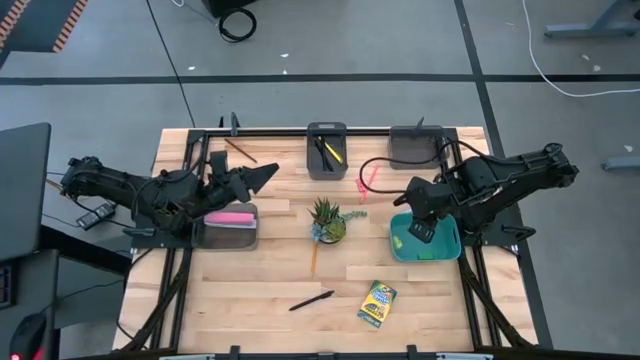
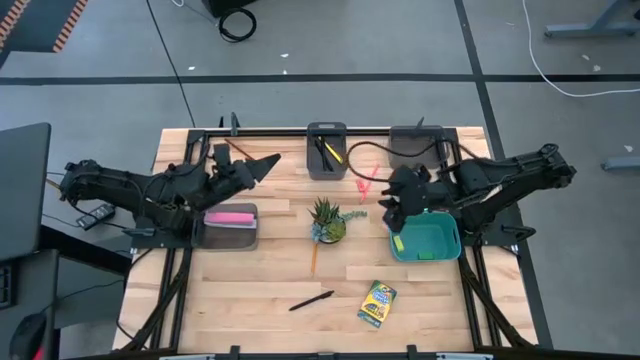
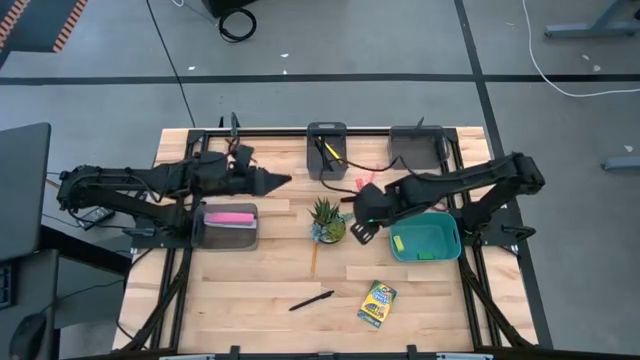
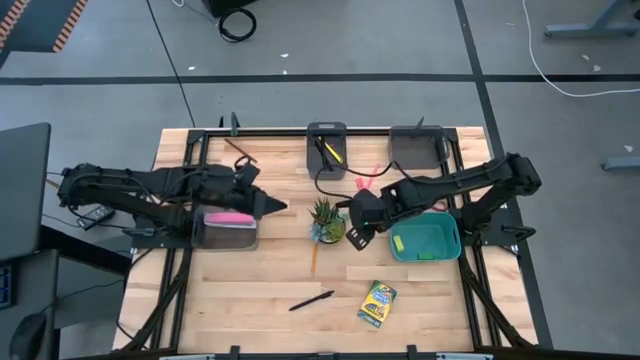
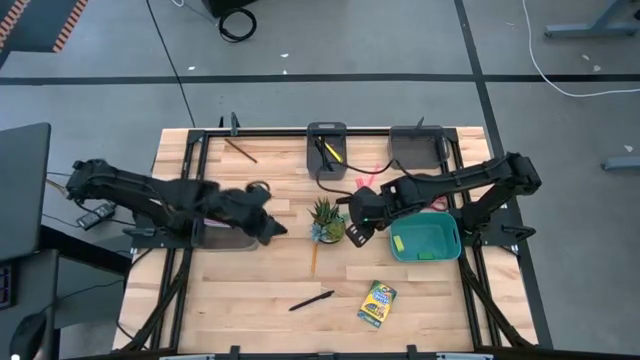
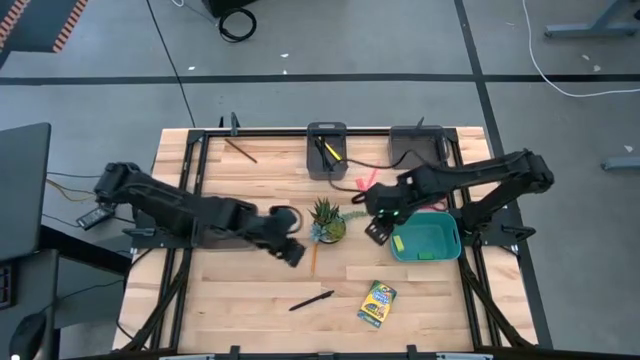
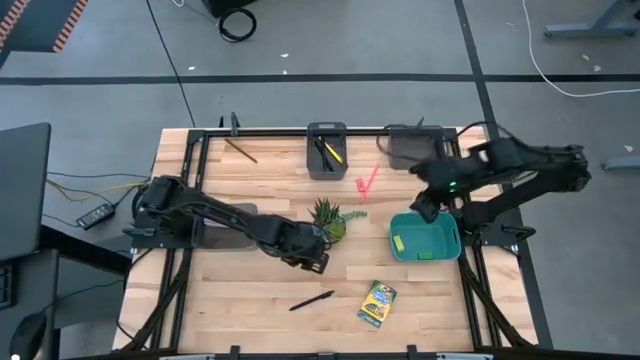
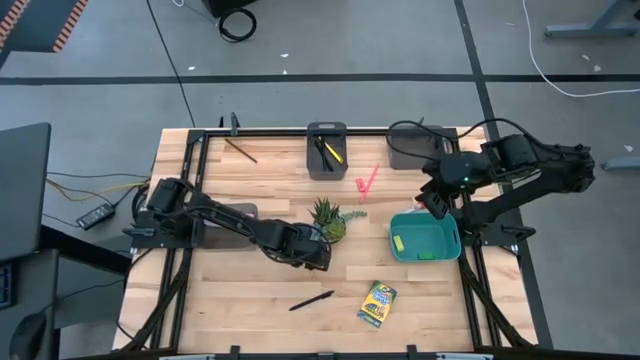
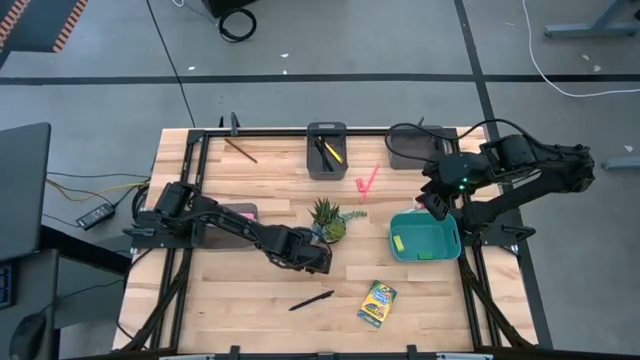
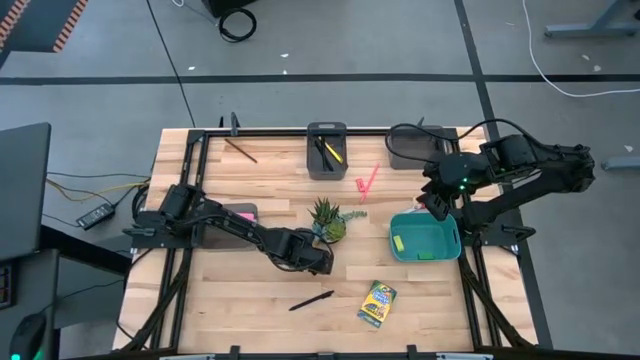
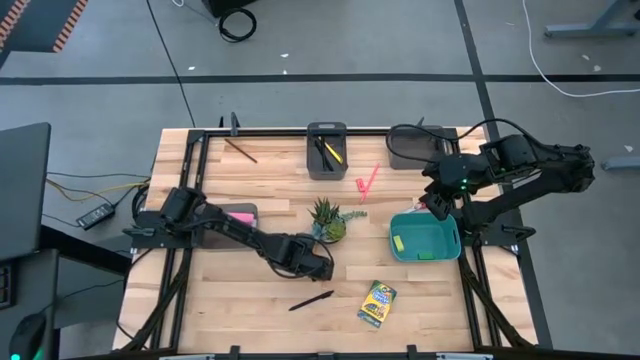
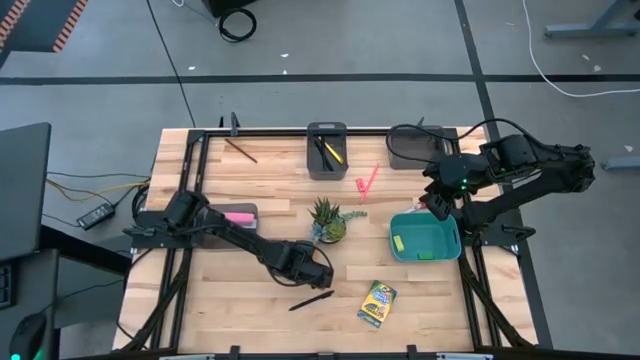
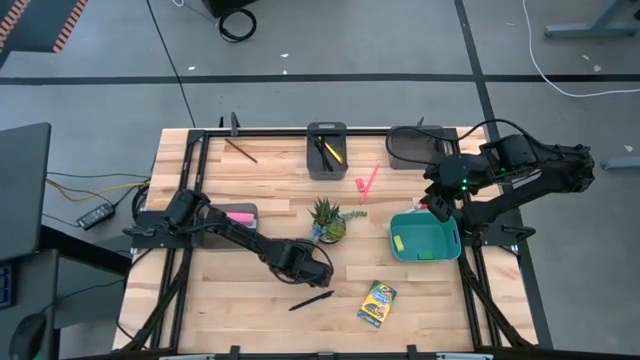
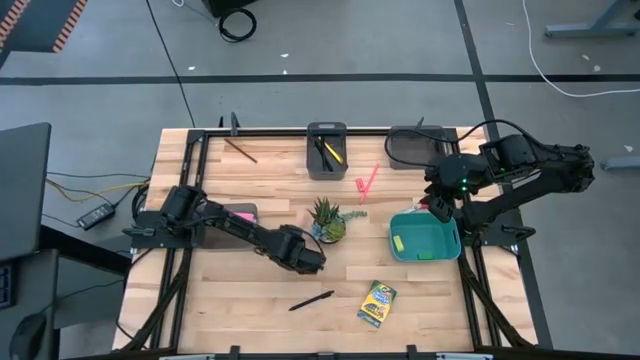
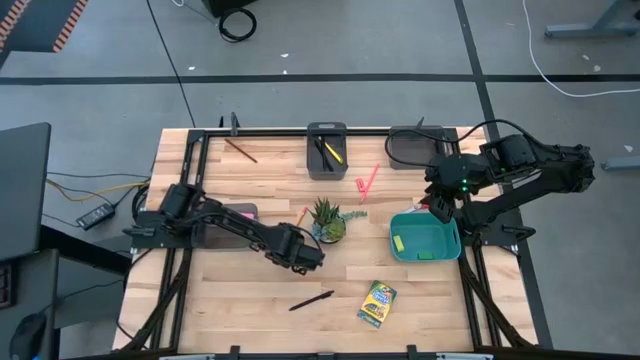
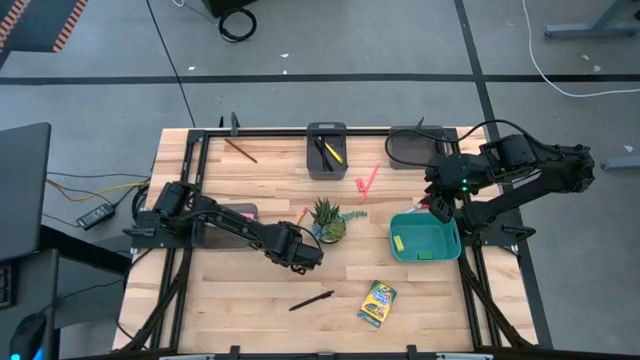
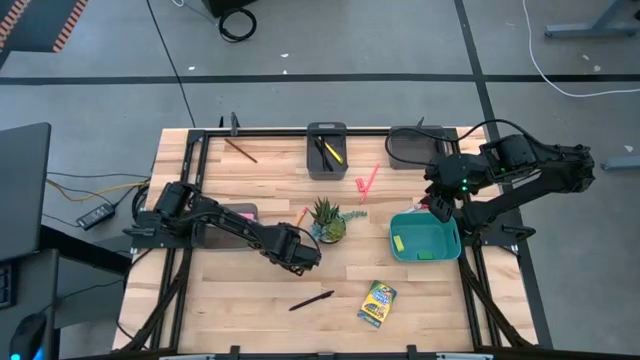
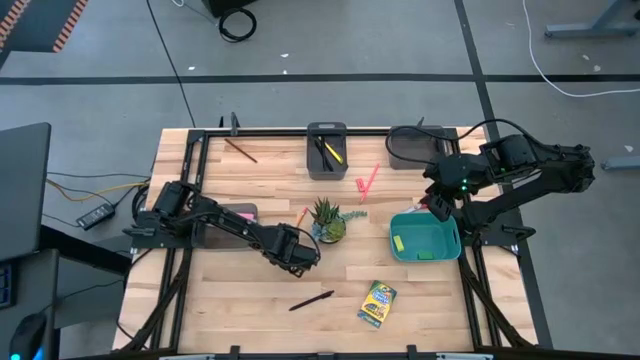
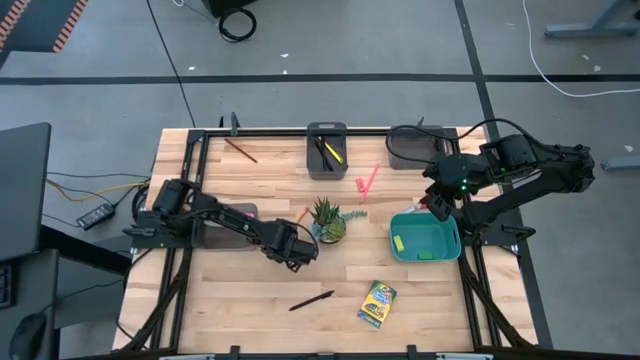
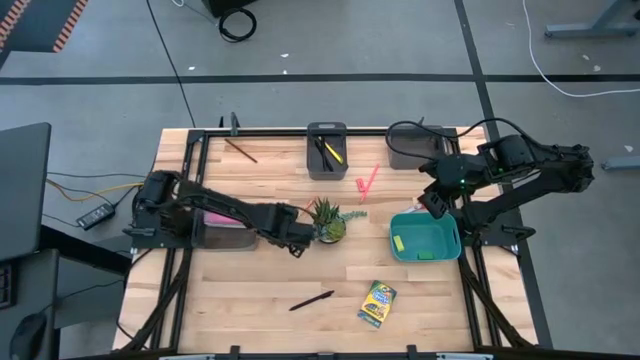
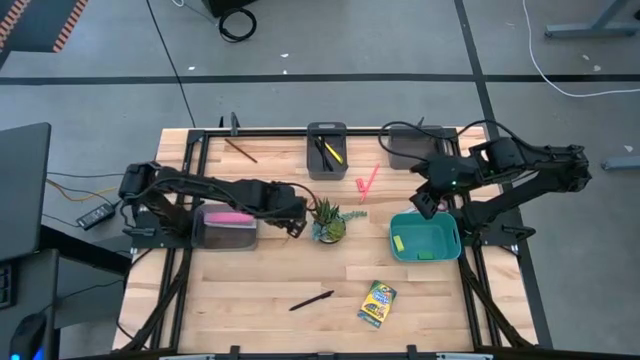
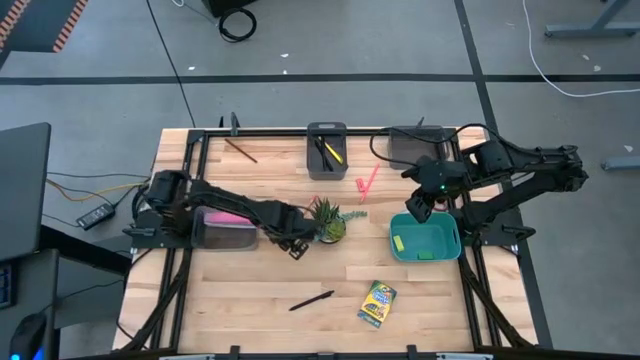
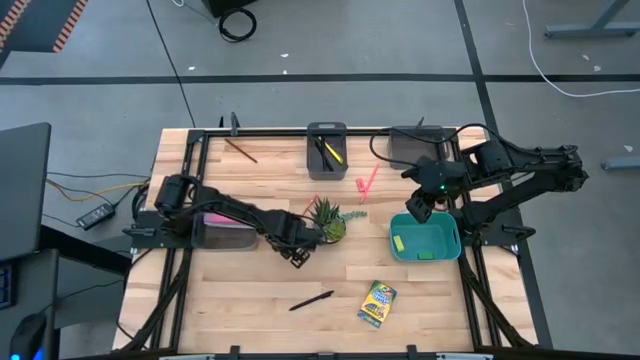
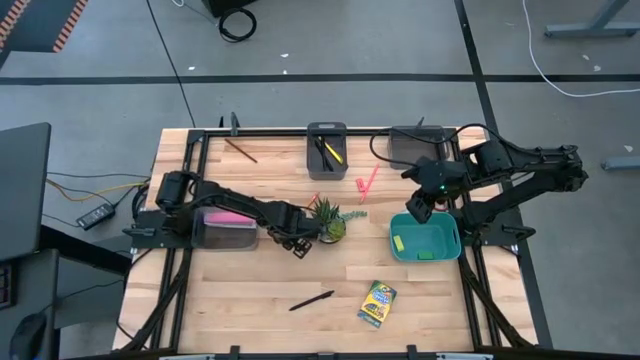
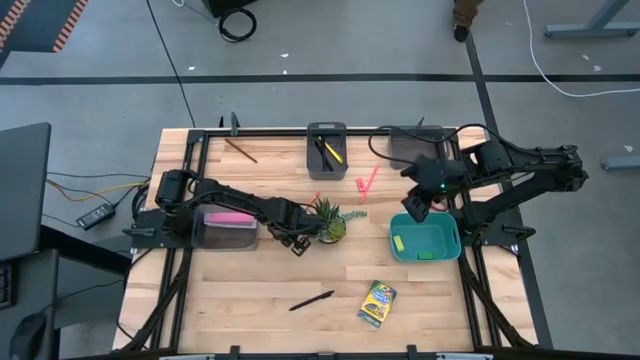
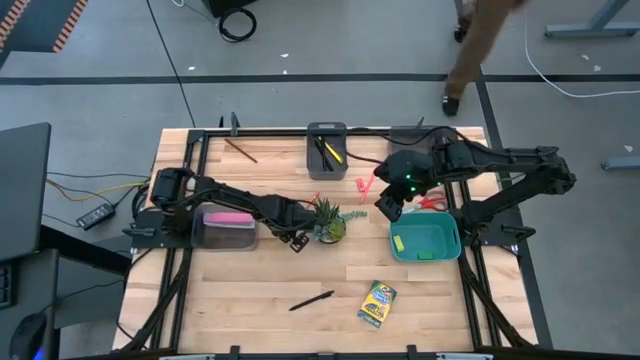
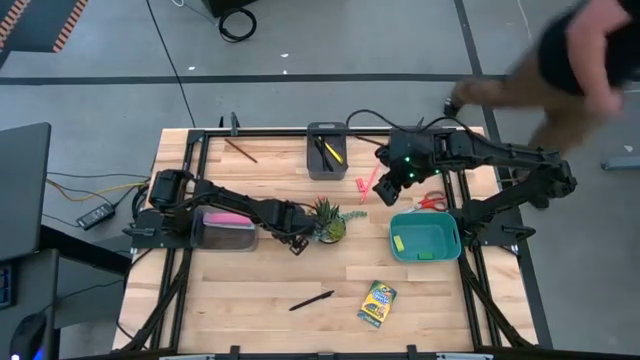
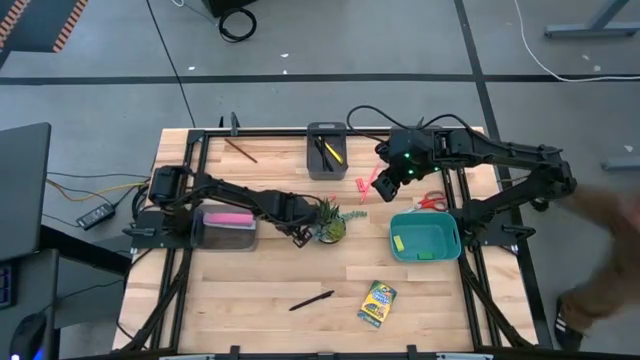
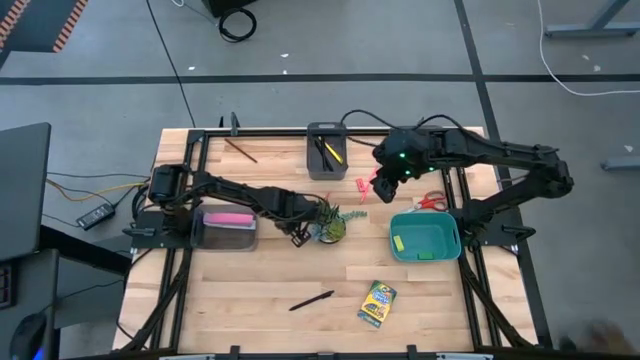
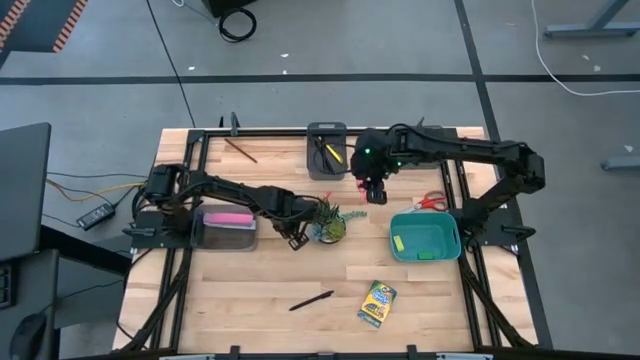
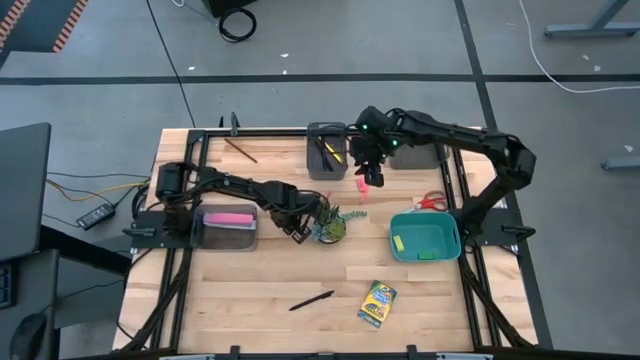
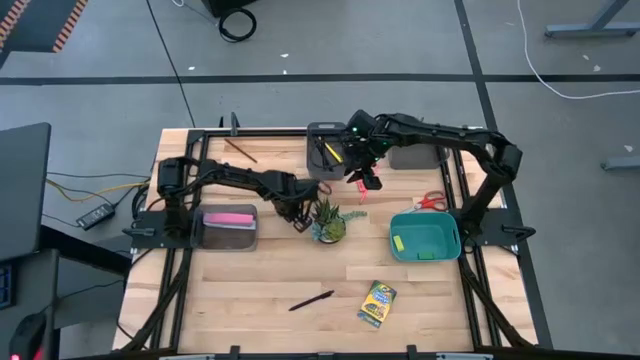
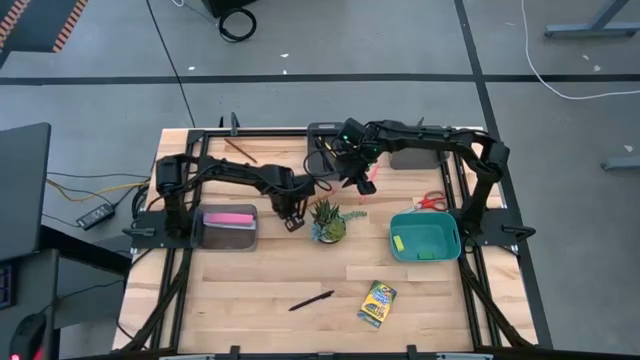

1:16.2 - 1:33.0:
Task: Sort crayons/erasers/pens/pencils in bins
Put the orange pencil into the right black bin

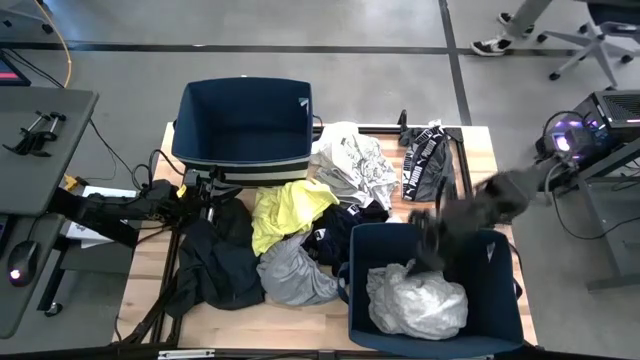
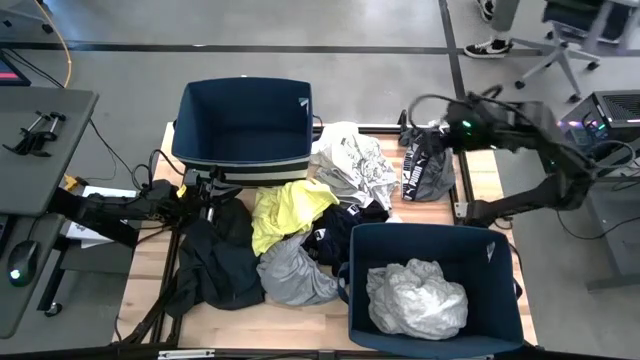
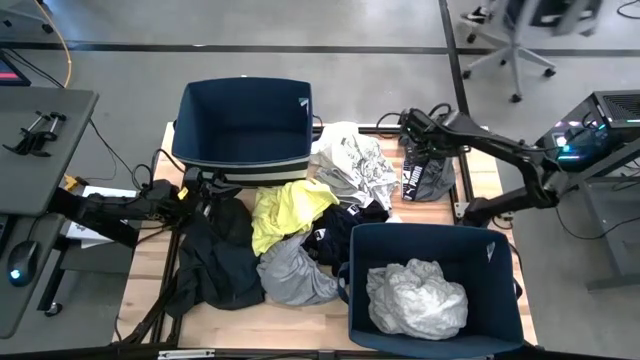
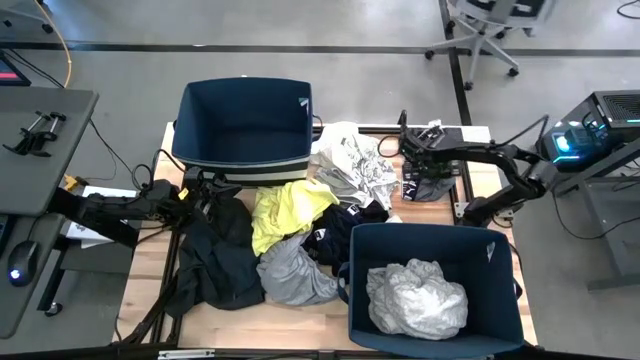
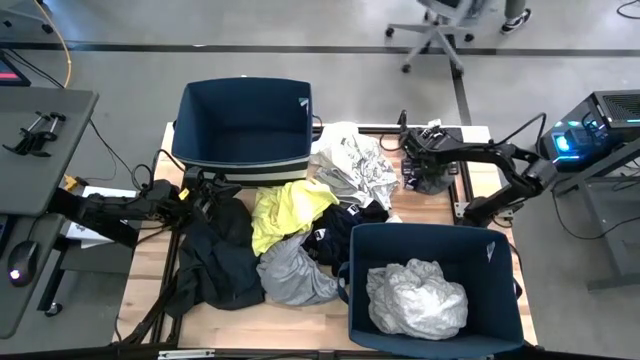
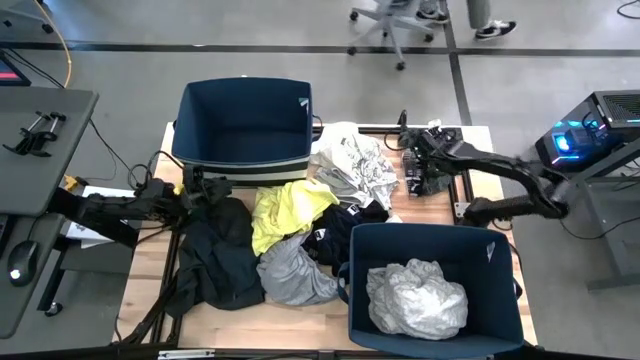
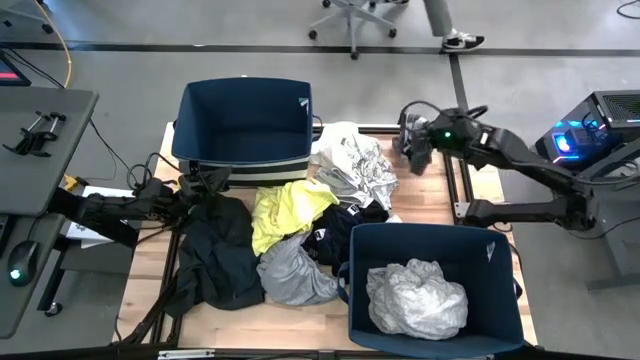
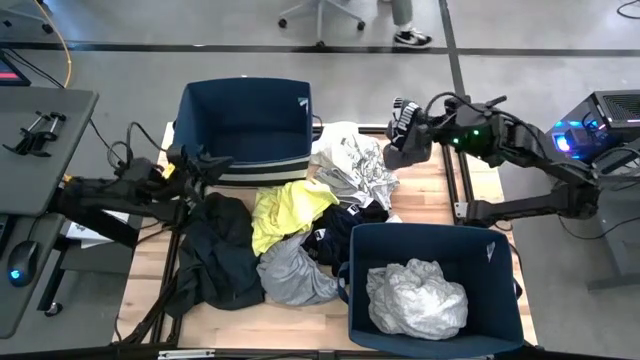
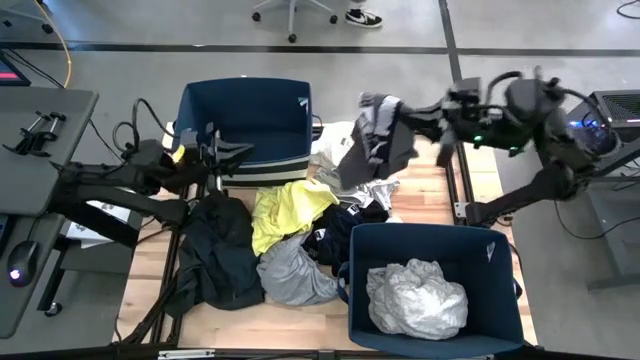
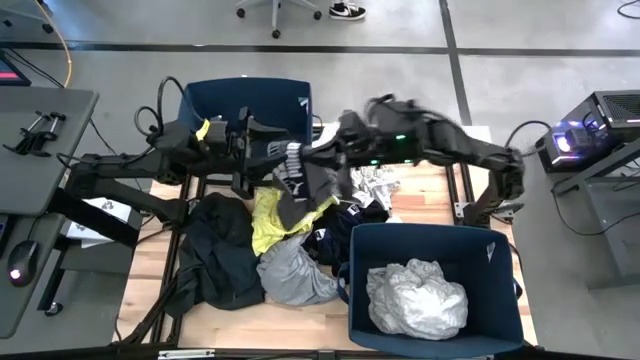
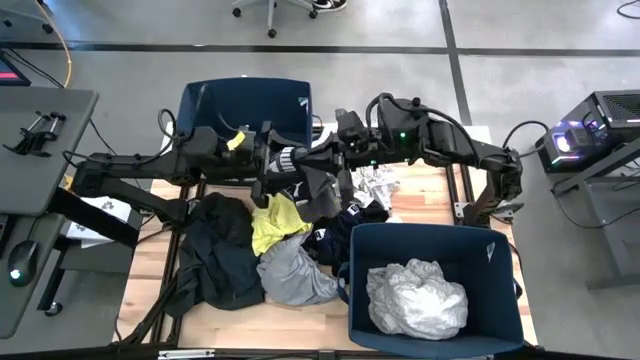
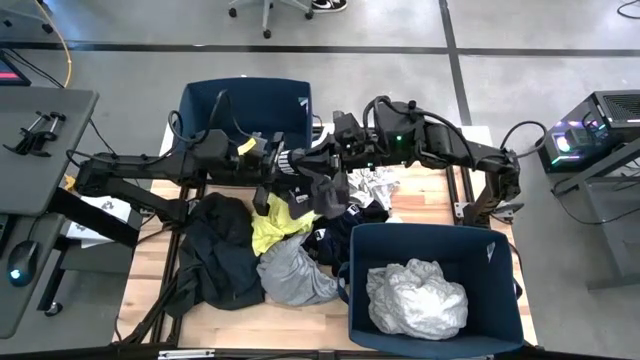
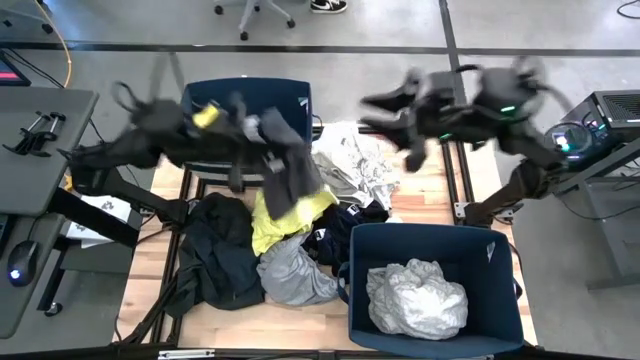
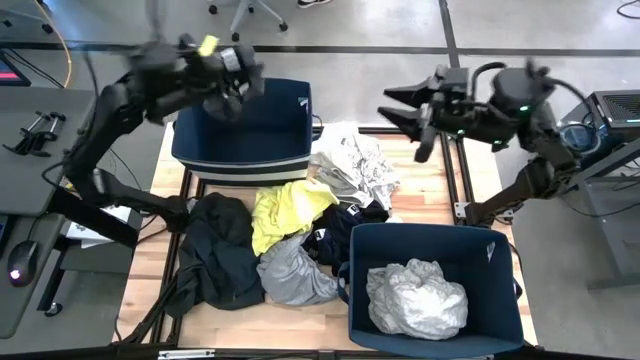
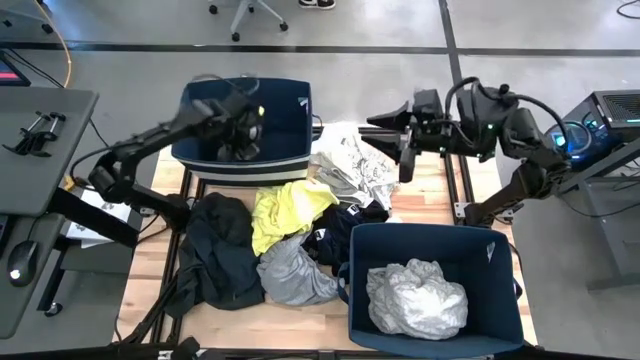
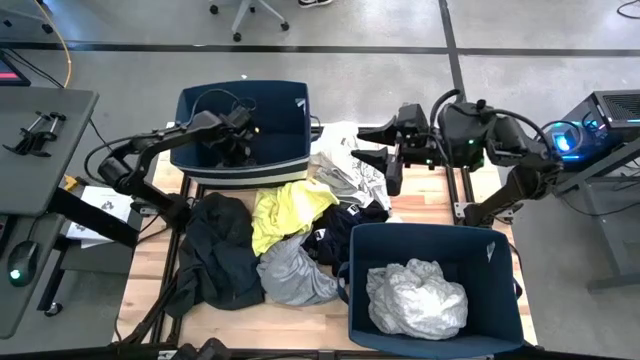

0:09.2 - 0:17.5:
Task: Sort clothes
Put the gray boxer shorts into the top blue laundry bin
